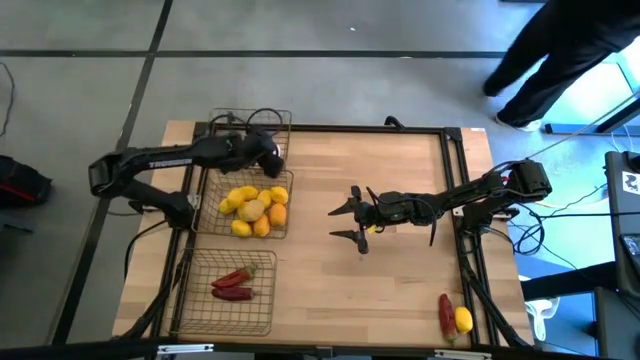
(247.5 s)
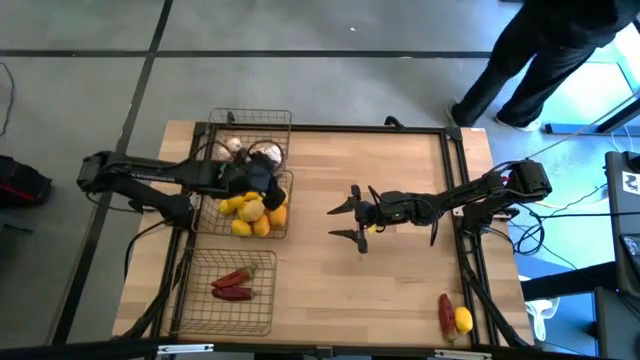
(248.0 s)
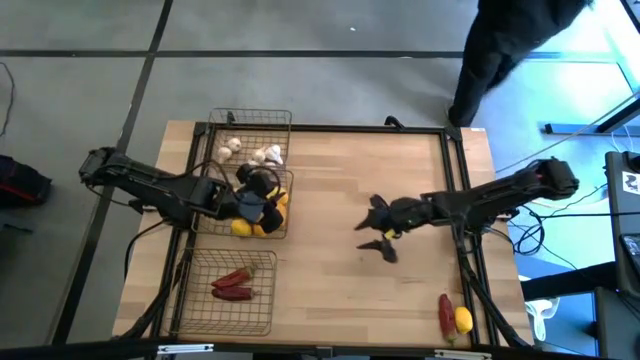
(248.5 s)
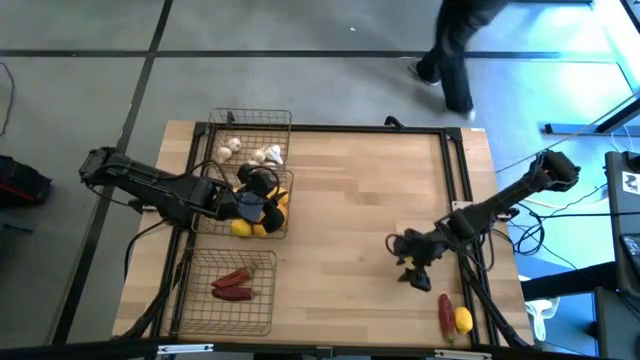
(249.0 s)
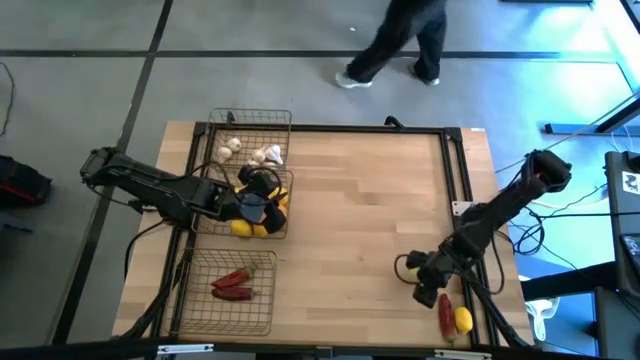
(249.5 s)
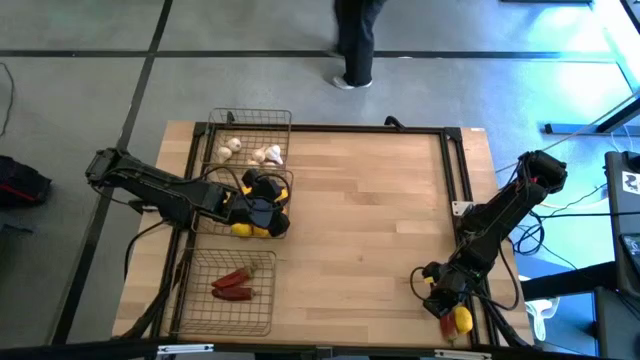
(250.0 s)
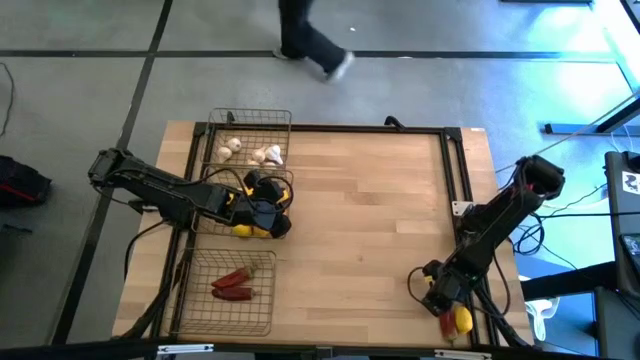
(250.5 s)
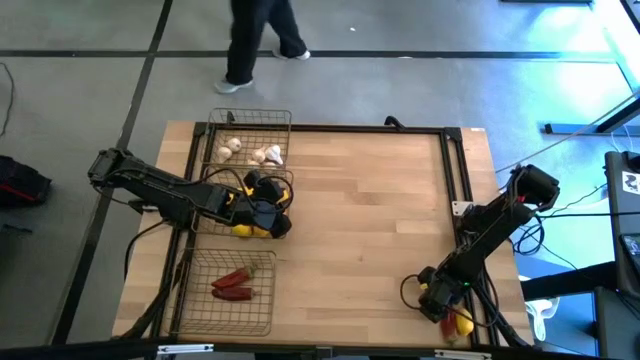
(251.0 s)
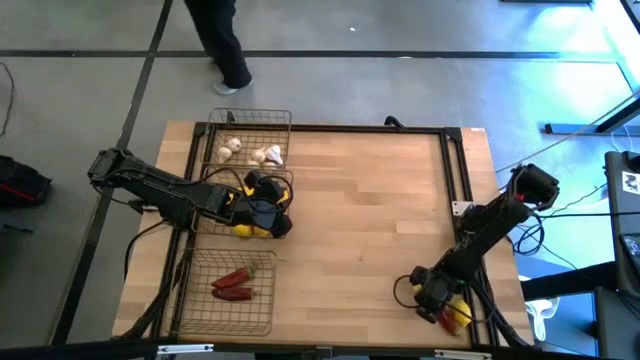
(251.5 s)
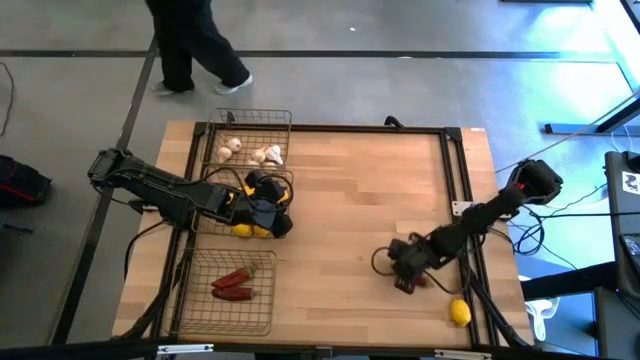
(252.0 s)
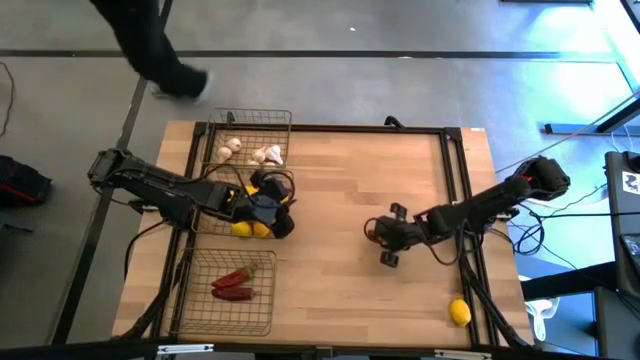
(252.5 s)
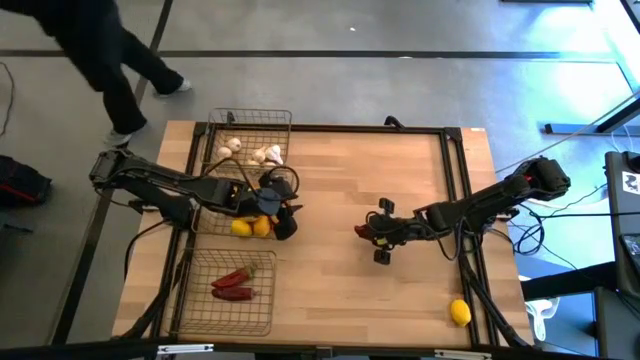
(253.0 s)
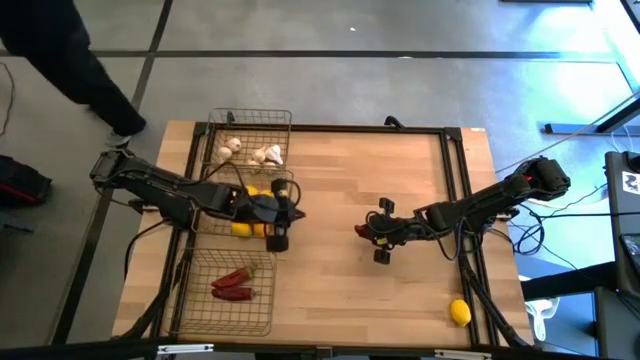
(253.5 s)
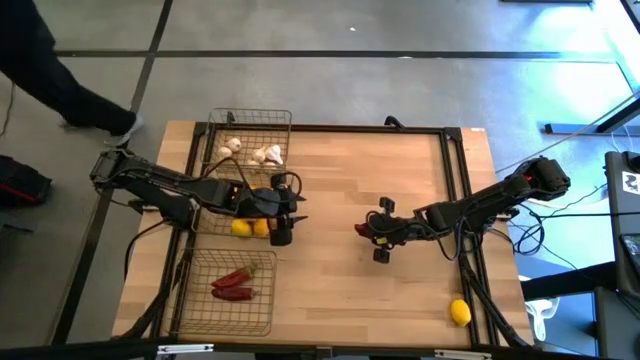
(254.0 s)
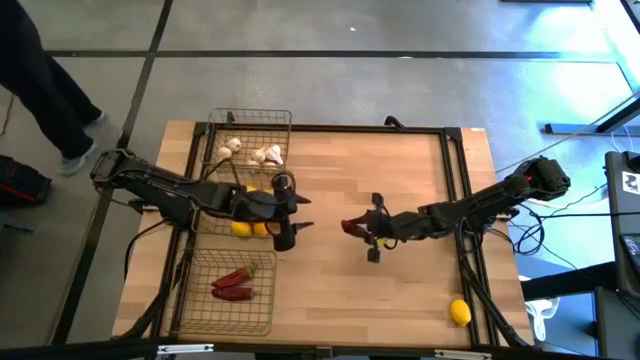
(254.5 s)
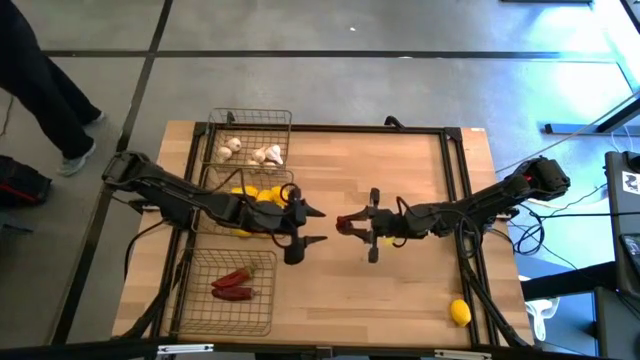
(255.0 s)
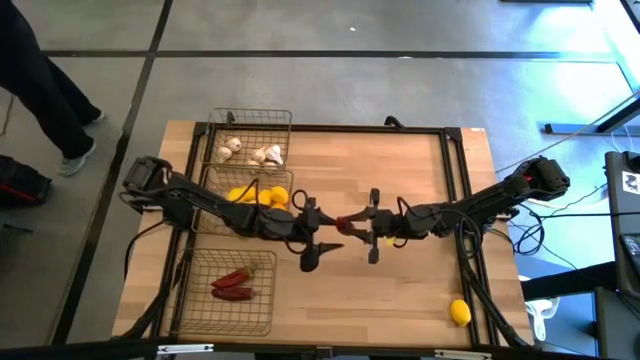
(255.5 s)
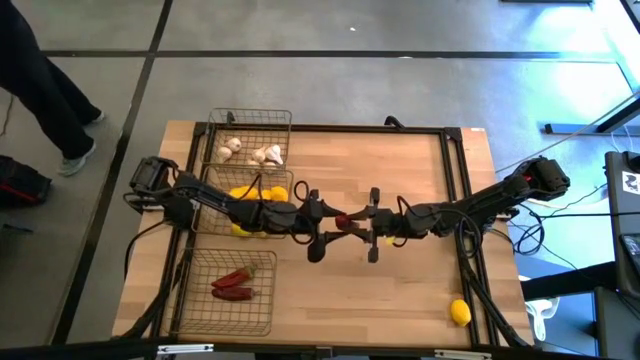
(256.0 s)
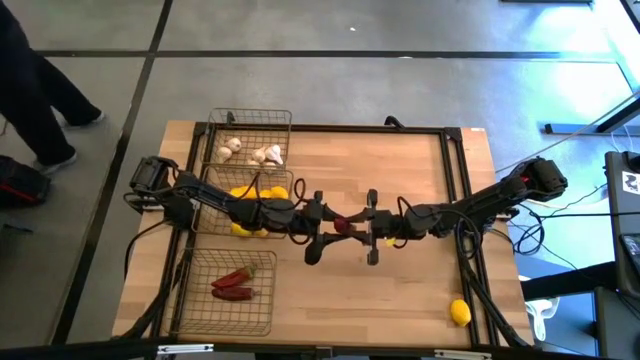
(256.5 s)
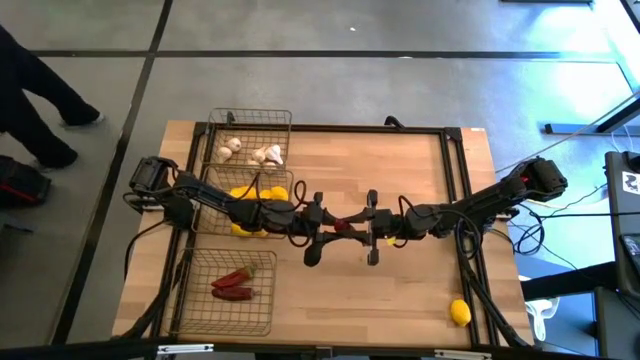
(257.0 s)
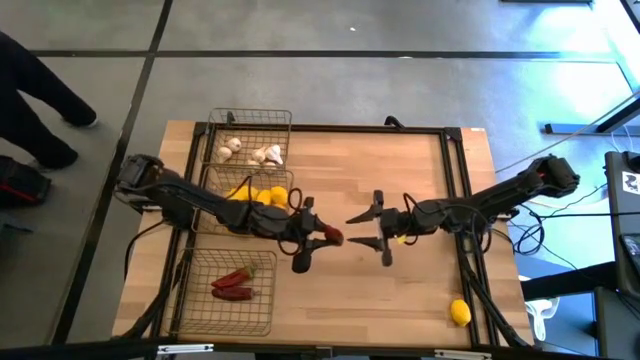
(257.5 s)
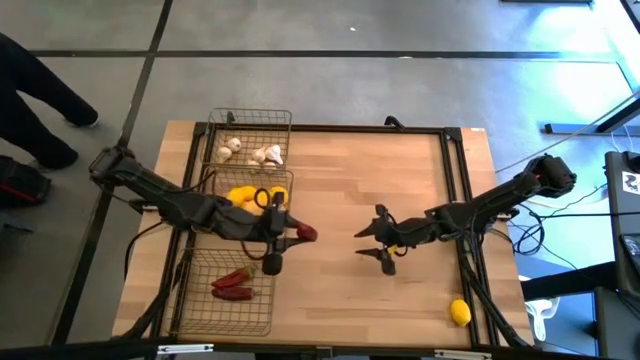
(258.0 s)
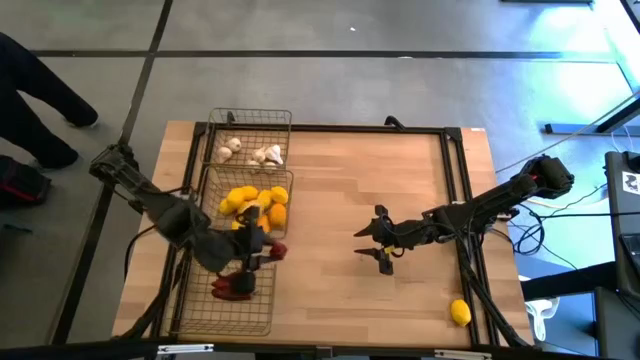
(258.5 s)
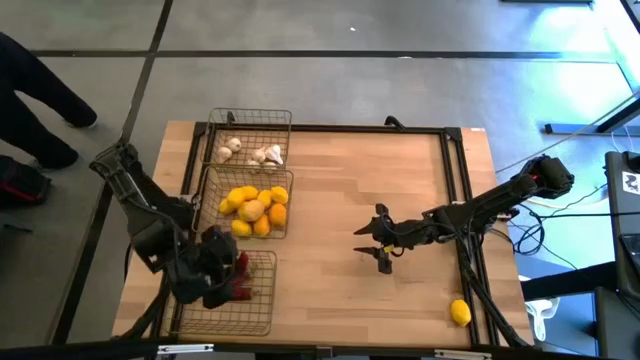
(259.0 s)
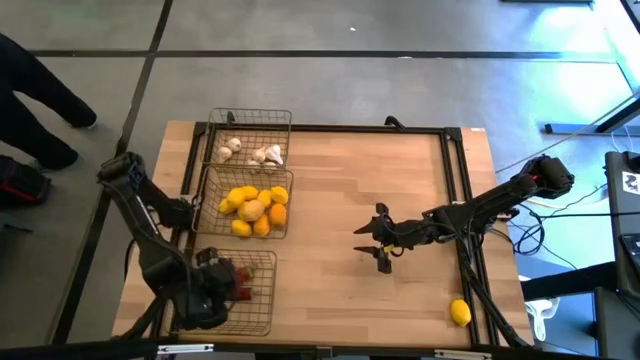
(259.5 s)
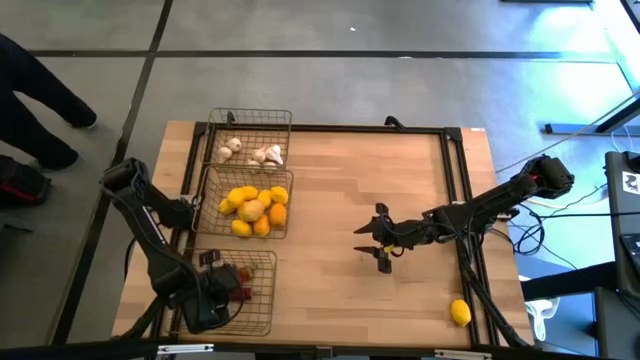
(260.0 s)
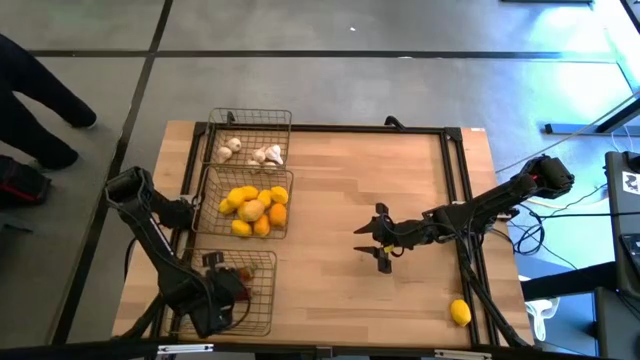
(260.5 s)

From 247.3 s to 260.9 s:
Task: Sort produce into baskets
Put the chili pepper in the bottom wire basket

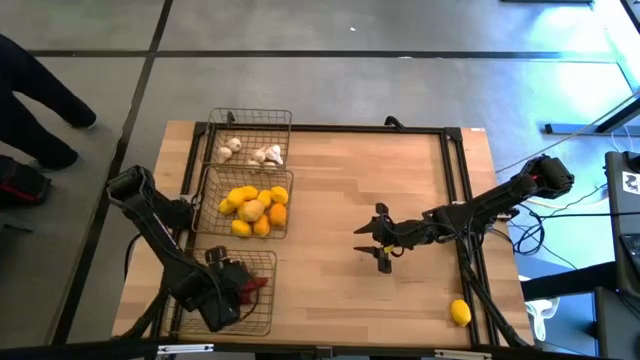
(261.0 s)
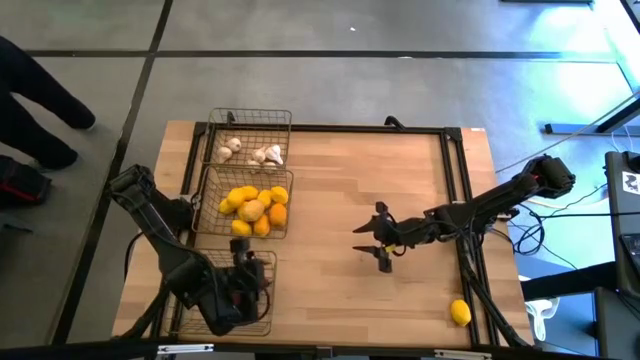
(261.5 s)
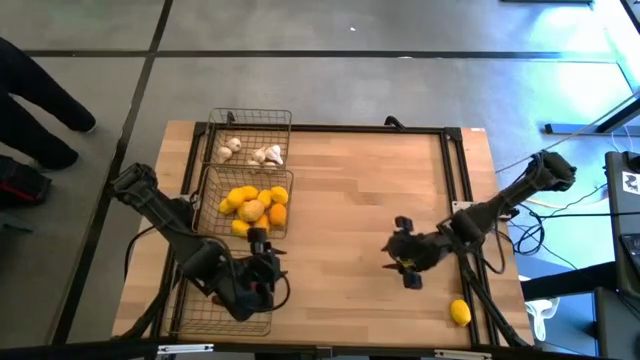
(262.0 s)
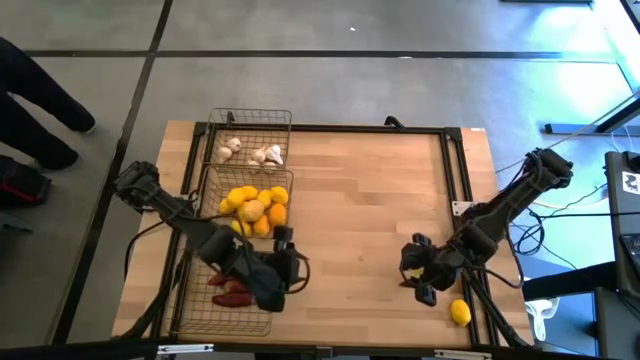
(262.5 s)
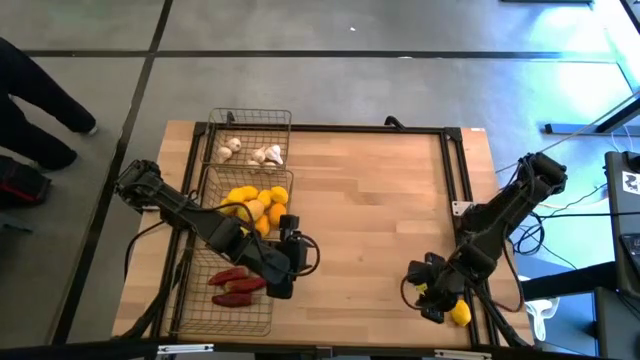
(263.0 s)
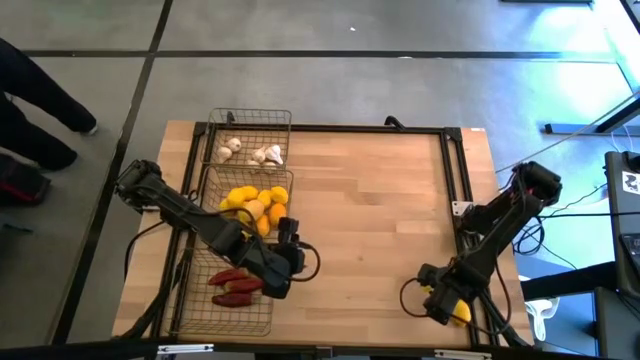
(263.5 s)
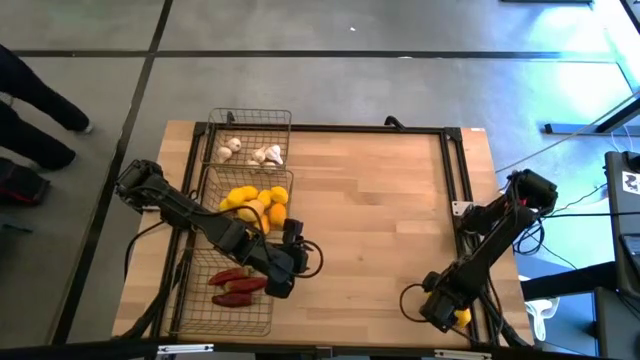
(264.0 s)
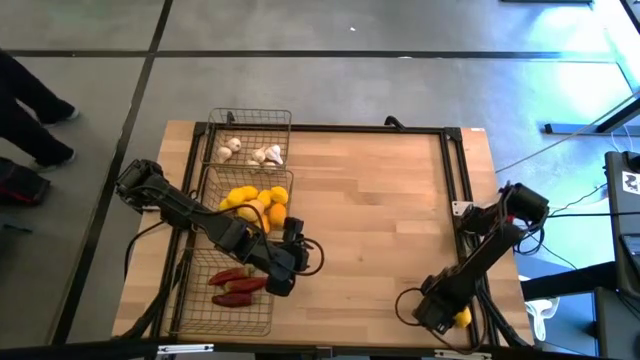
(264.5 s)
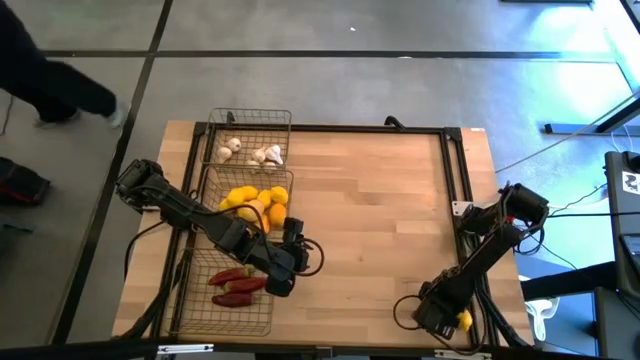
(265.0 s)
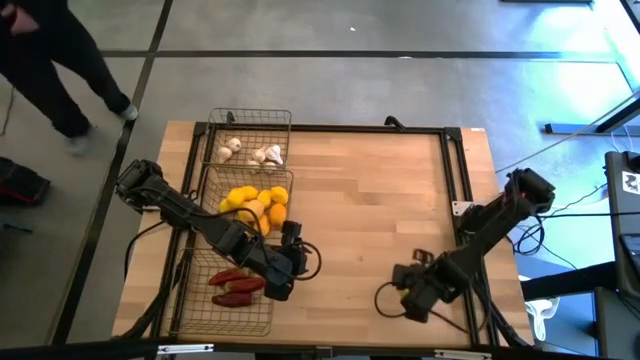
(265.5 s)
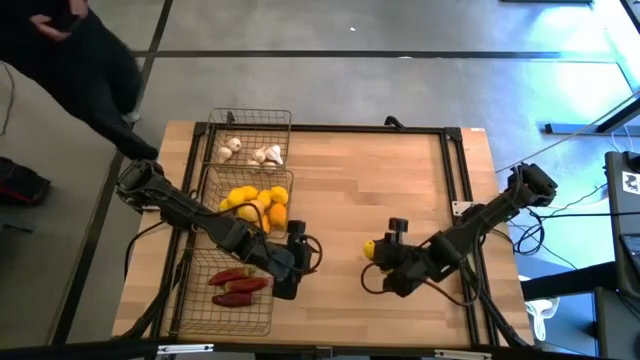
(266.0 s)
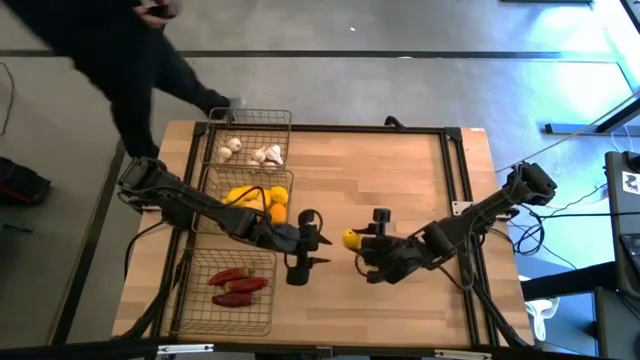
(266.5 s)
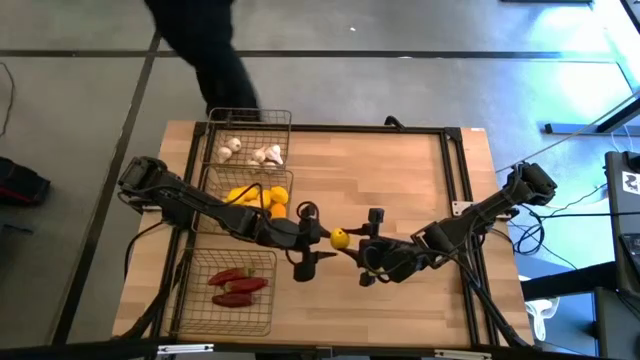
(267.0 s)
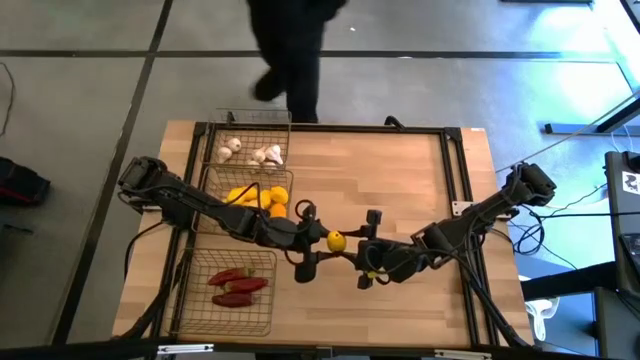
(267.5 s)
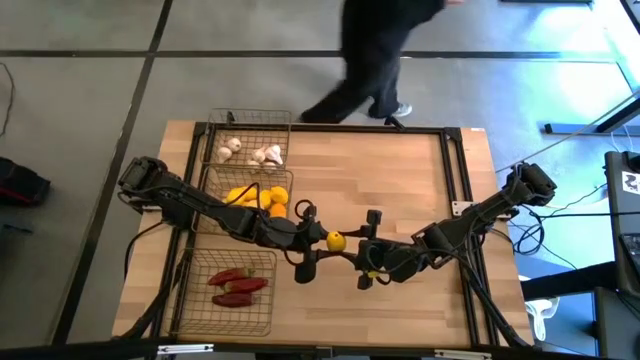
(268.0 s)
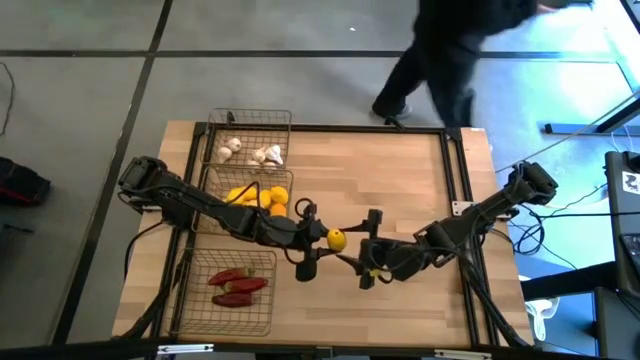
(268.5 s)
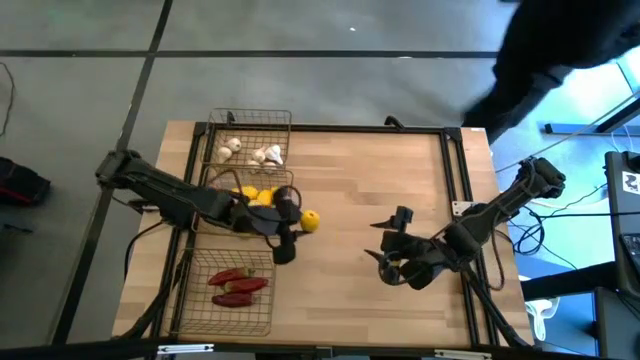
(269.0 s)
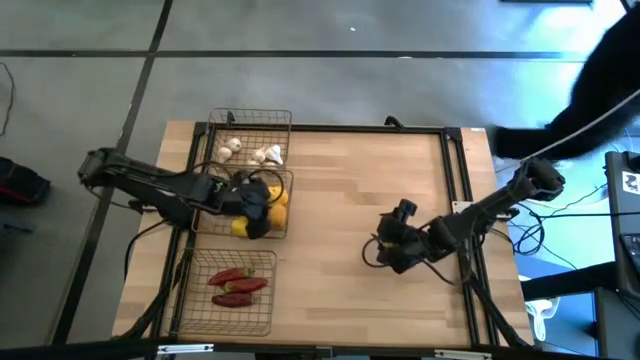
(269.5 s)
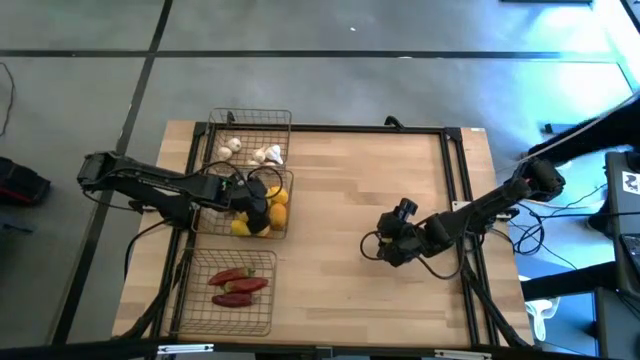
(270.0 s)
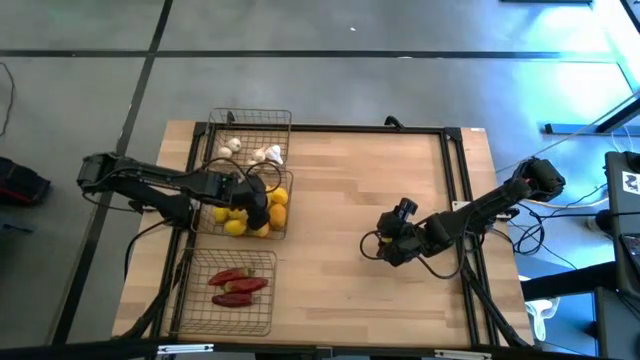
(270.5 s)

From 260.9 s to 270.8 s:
Put the lemon in the middle wire basket
